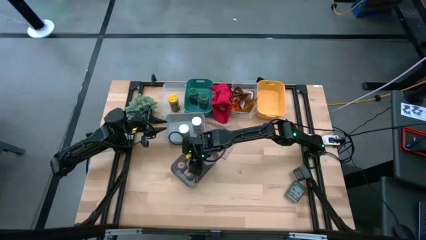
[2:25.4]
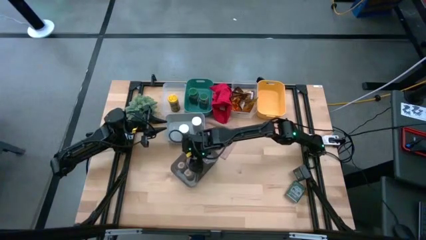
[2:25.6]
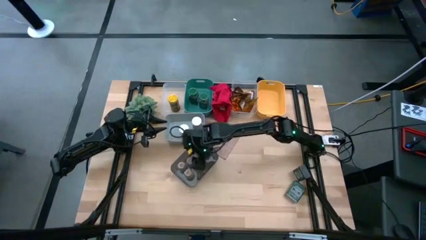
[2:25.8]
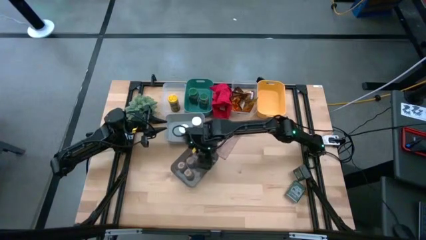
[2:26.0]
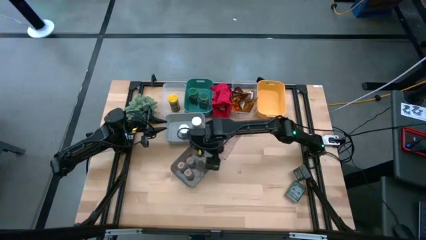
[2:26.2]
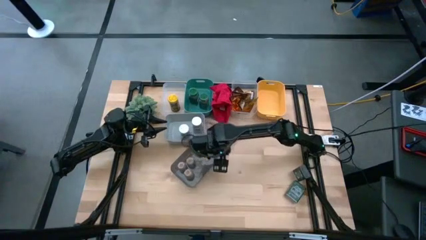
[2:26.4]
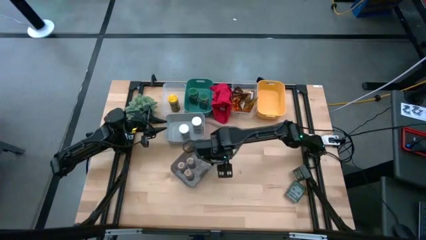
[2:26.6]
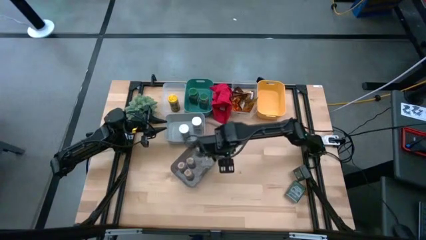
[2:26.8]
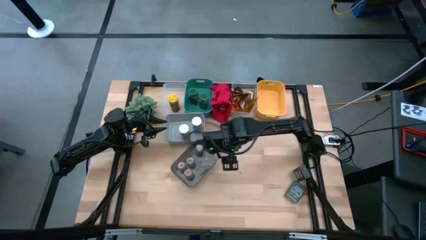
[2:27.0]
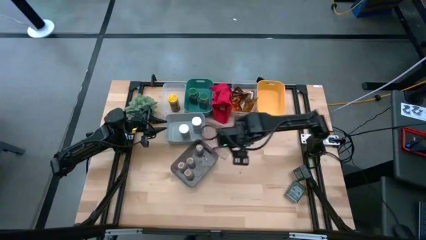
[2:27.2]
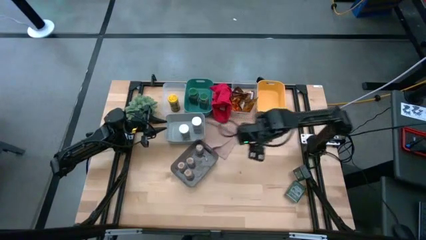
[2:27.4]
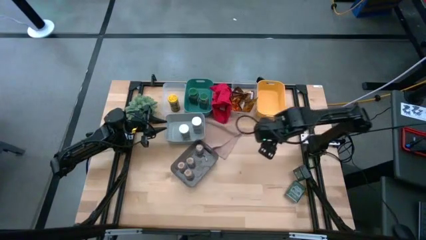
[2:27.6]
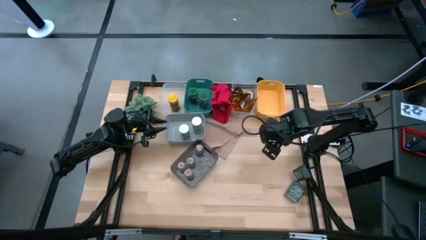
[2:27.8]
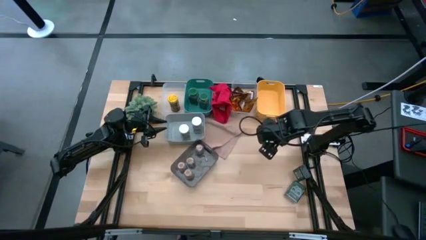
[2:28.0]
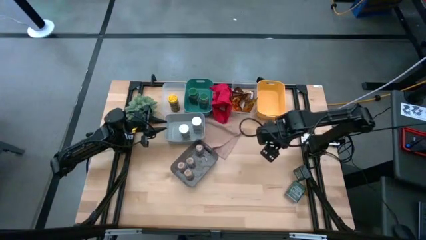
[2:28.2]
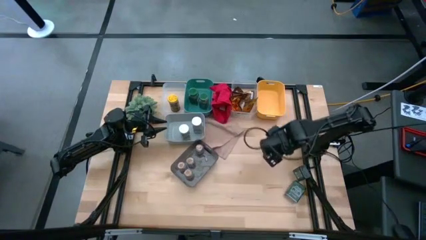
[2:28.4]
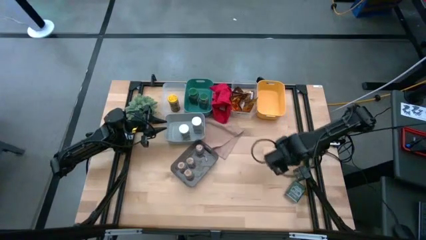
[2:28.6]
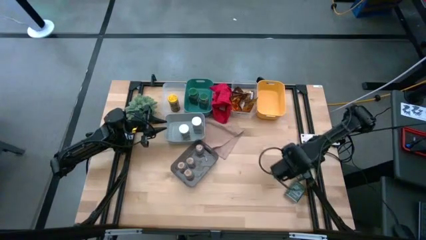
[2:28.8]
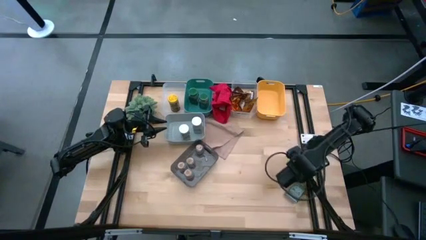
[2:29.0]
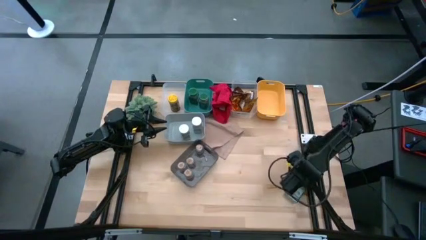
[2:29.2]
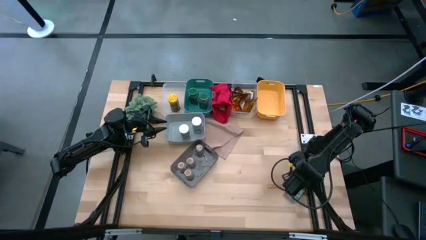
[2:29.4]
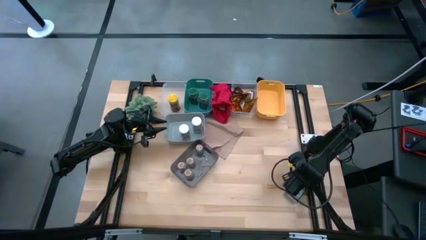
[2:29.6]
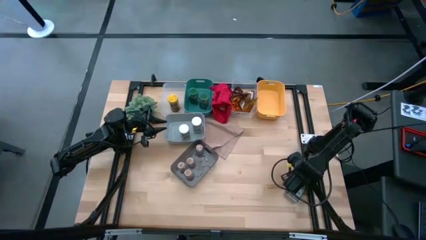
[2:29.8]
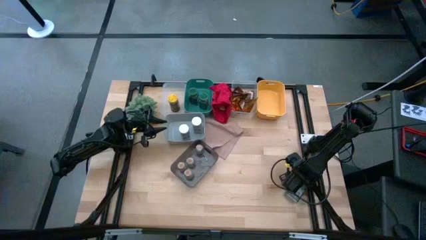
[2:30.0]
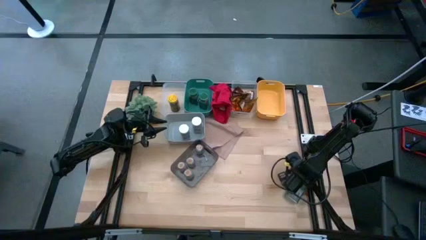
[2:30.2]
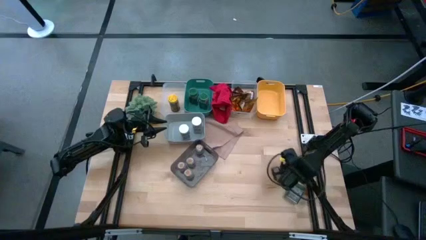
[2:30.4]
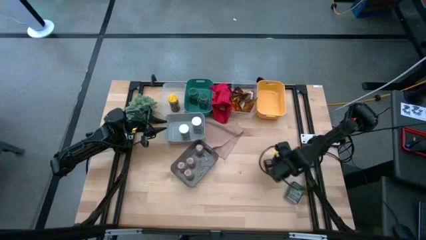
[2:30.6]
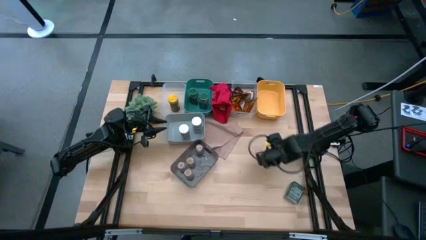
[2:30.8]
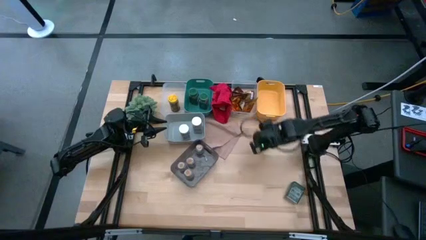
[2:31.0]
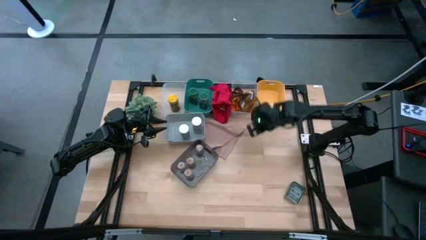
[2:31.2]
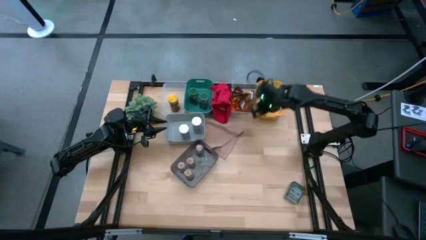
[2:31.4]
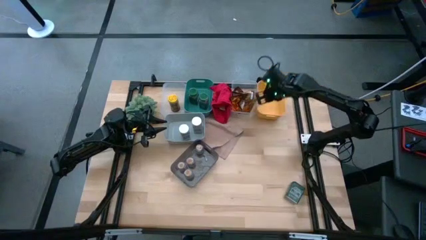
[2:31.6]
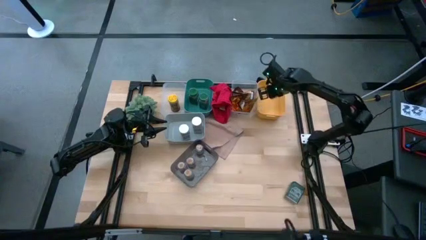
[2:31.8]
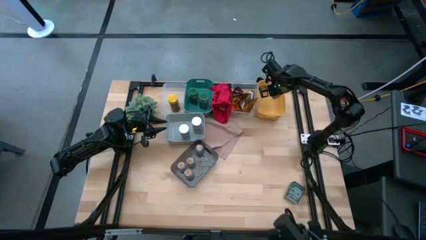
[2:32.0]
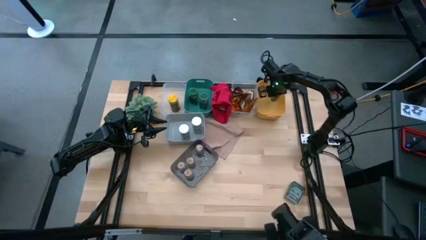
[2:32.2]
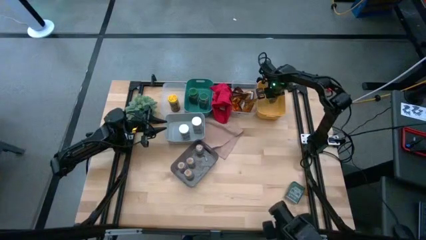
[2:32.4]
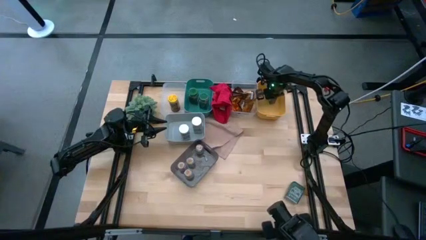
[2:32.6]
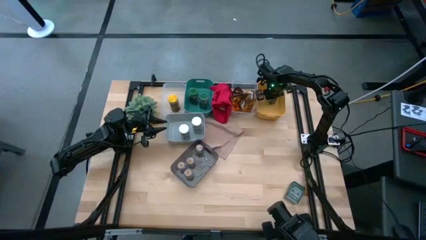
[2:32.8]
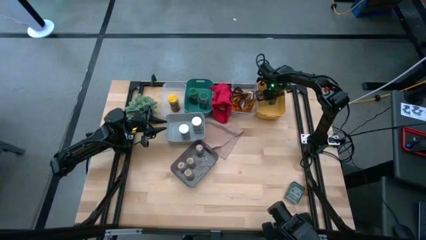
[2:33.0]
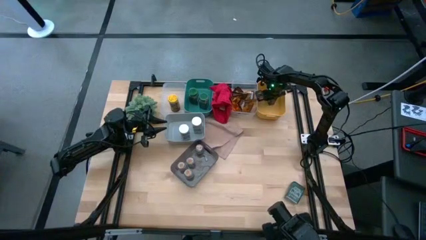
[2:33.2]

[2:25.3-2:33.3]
Task: Sort spices by type
Put the black seasoning can into the yellow bin

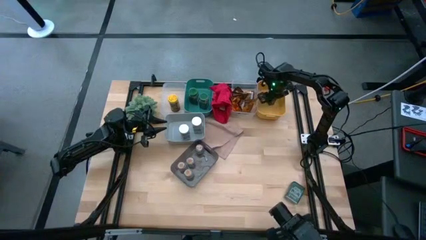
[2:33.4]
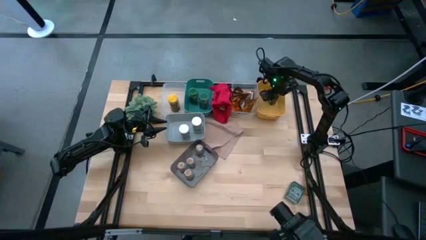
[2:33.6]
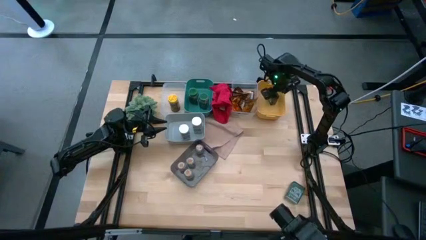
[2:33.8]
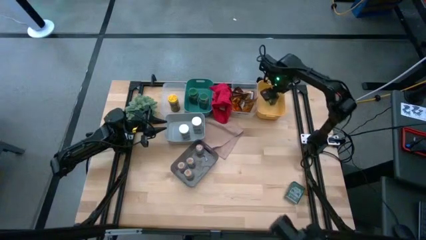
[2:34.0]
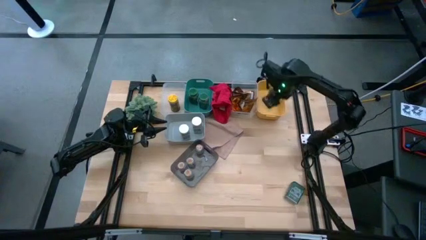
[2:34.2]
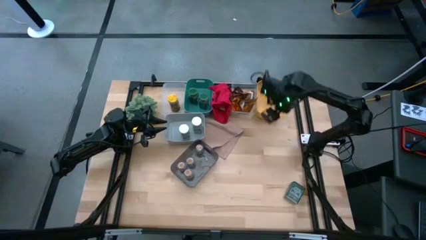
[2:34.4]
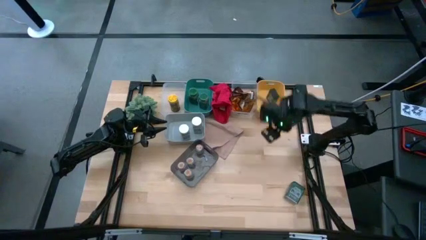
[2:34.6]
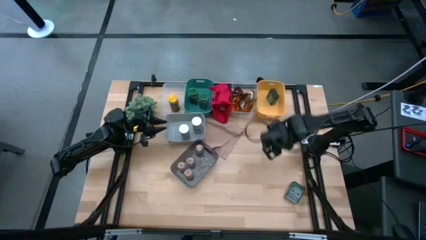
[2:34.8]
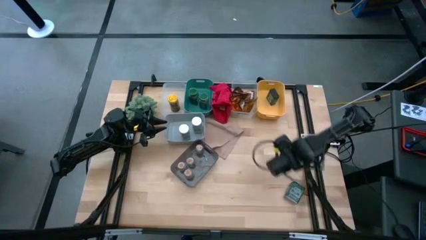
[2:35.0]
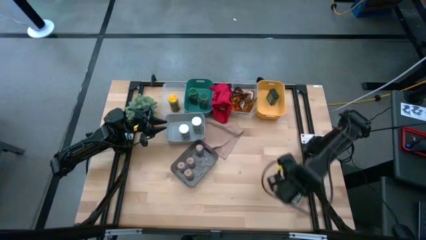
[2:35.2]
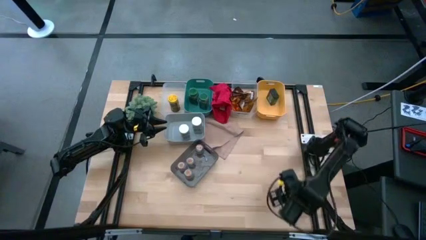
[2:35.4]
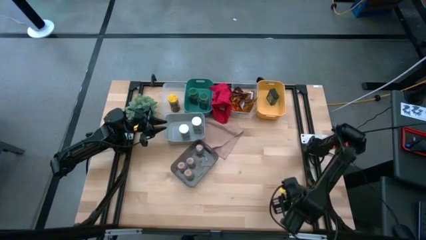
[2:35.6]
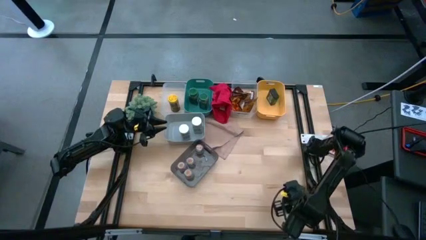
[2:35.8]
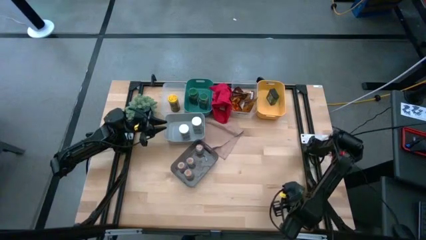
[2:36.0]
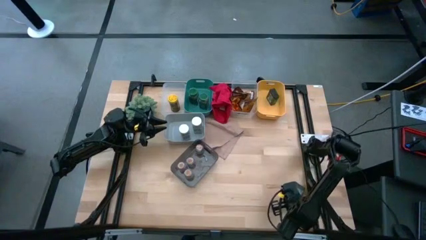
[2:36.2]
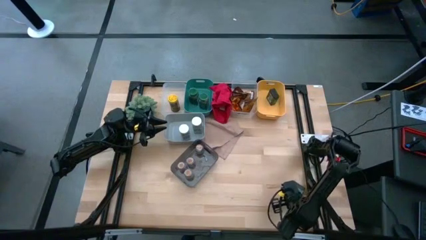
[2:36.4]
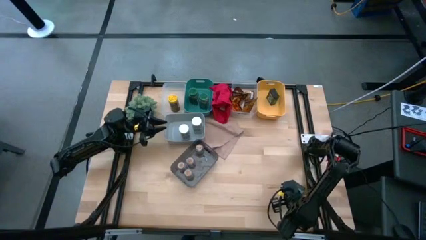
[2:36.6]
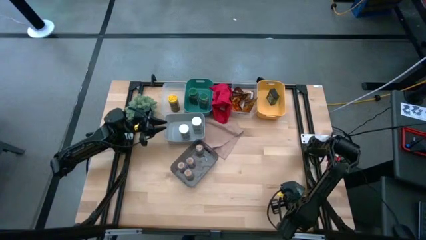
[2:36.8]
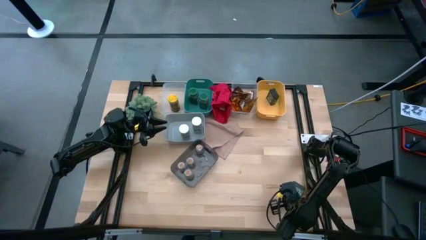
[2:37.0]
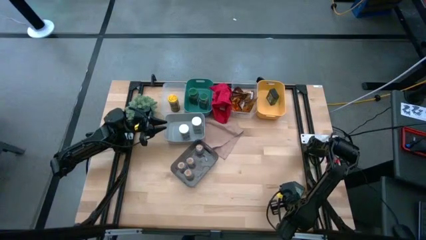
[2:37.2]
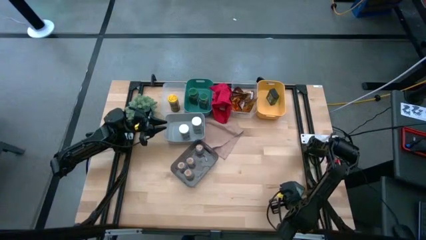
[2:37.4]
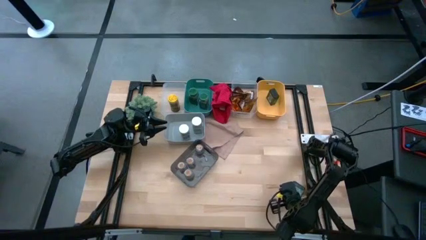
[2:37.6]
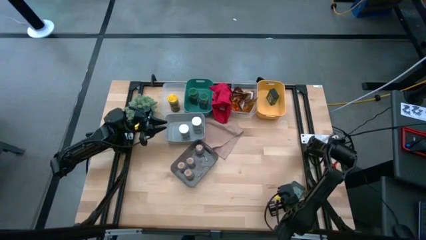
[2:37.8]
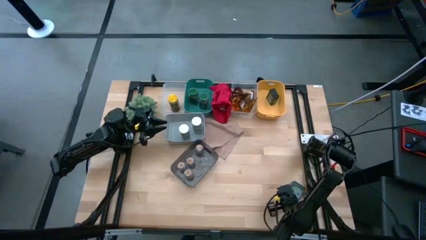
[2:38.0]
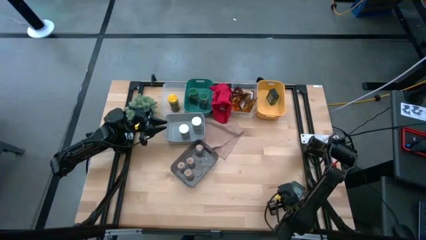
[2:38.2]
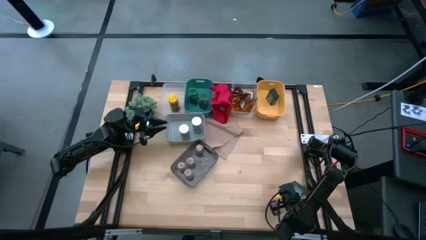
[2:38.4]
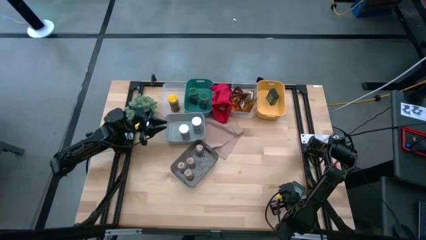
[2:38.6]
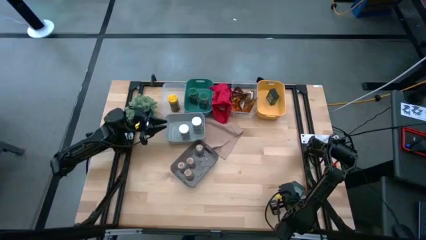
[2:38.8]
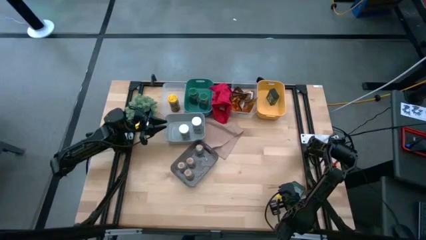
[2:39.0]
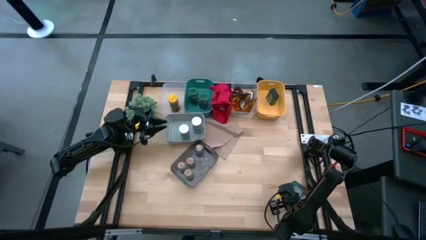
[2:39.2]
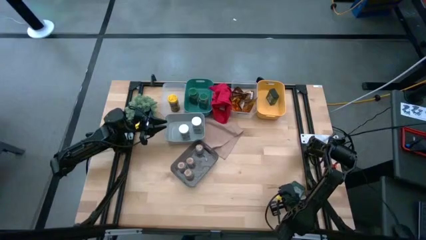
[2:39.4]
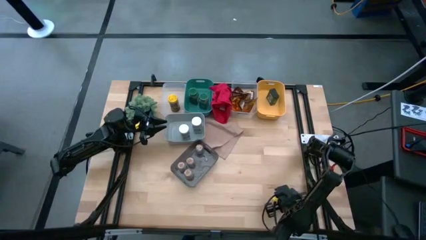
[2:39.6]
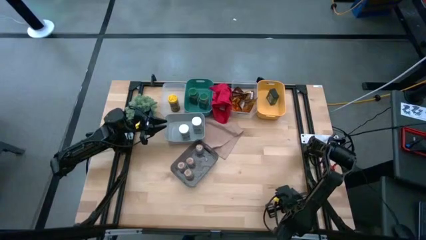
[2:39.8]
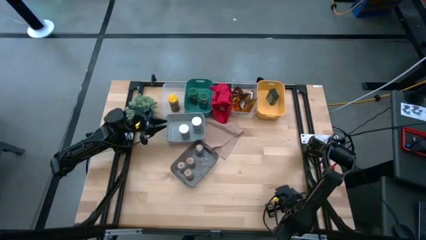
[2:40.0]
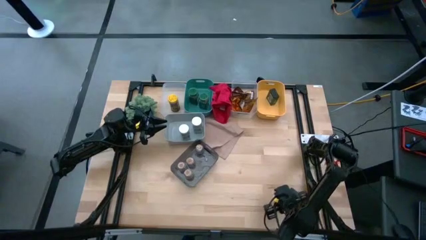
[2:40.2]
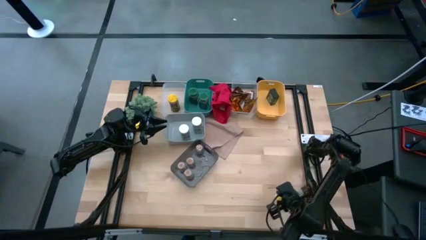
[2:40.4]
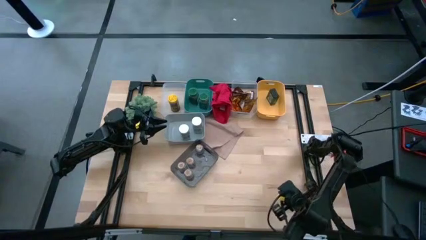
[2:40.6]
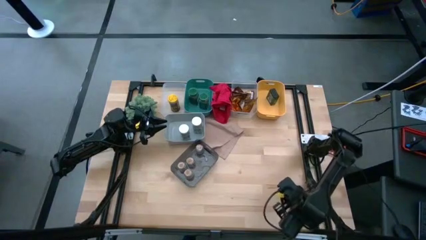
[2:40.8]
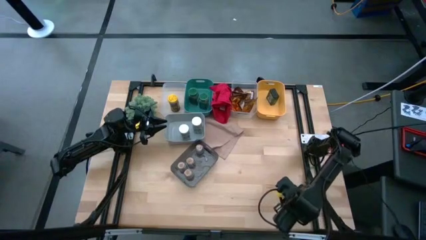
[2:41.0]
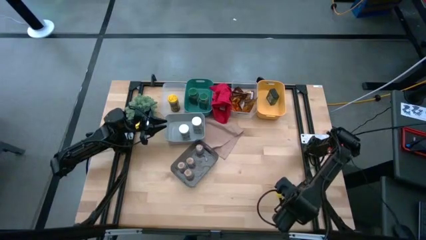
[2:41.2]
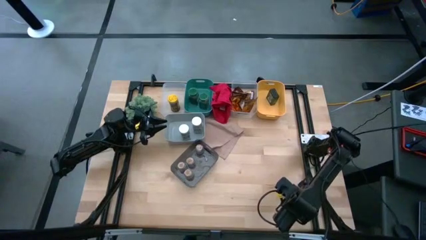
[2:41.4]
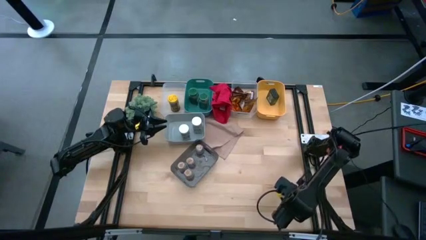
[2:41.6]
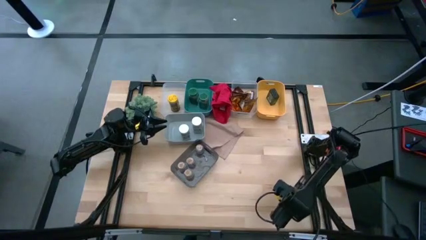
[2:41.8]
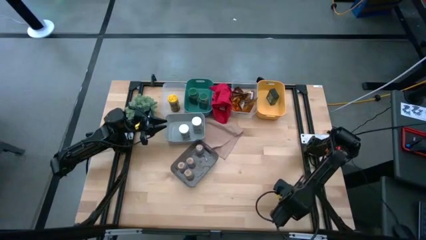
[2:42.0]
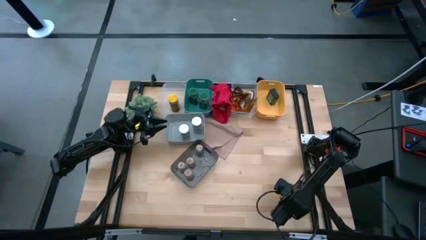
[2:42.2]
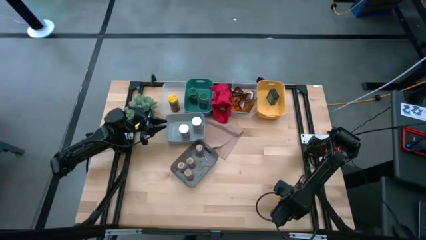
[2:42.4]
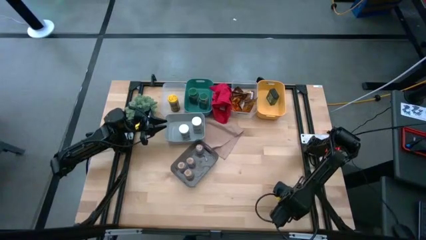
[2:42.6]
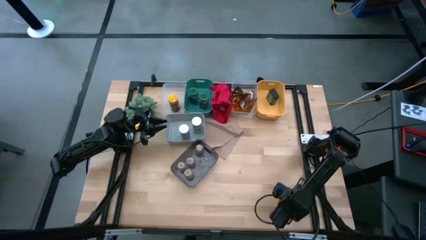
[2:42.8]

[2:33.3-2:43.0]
Put the black seasoning can into the yellow bin
